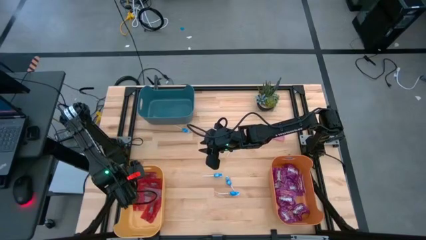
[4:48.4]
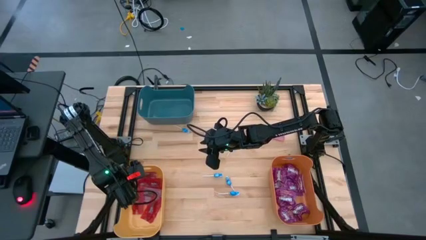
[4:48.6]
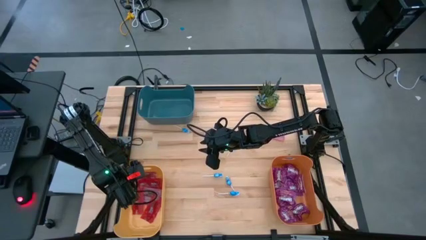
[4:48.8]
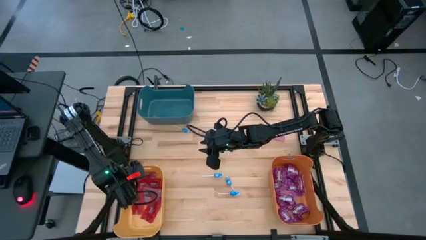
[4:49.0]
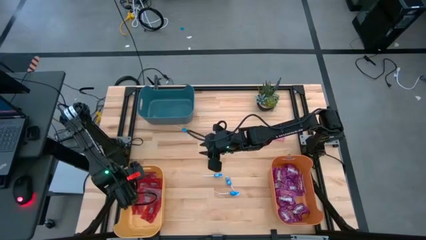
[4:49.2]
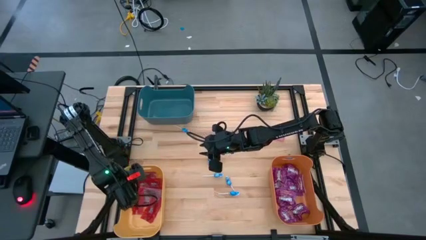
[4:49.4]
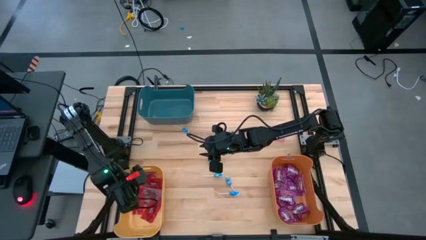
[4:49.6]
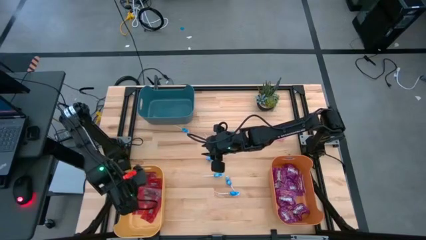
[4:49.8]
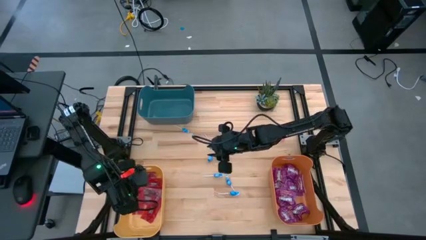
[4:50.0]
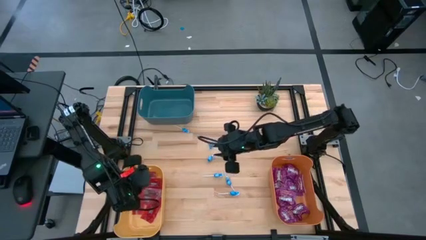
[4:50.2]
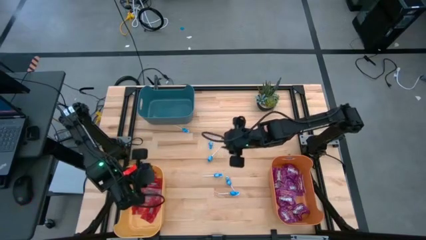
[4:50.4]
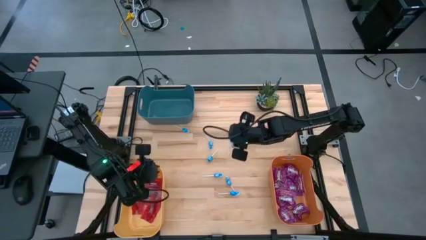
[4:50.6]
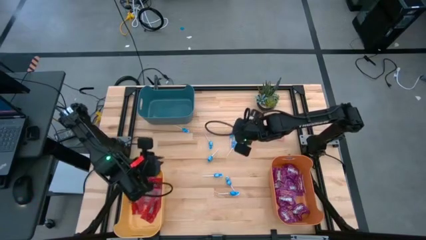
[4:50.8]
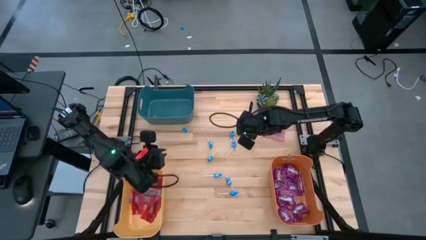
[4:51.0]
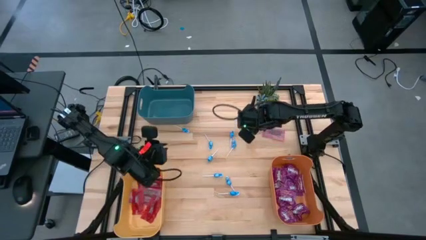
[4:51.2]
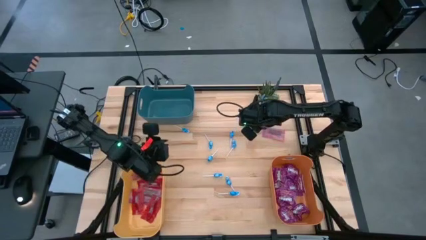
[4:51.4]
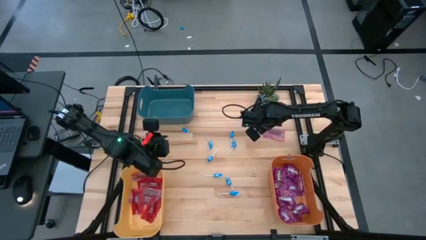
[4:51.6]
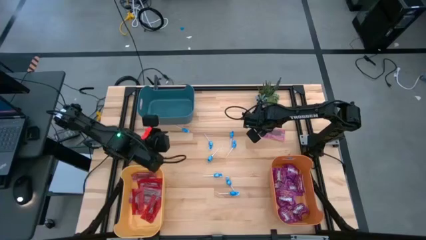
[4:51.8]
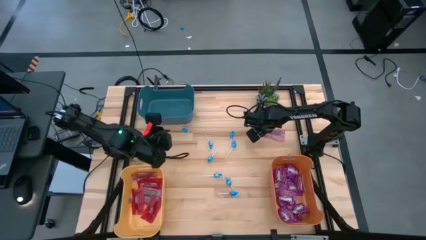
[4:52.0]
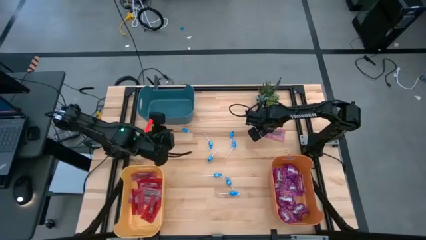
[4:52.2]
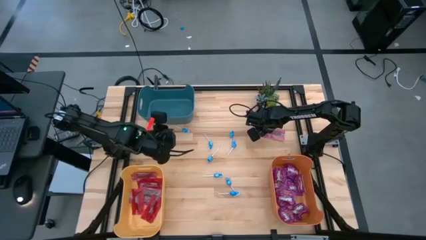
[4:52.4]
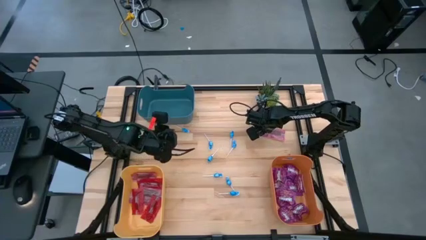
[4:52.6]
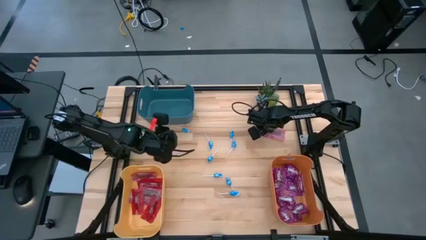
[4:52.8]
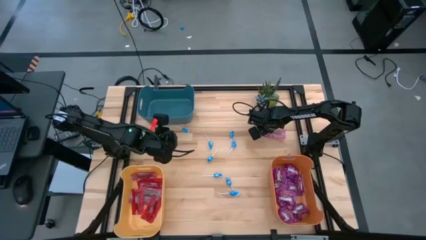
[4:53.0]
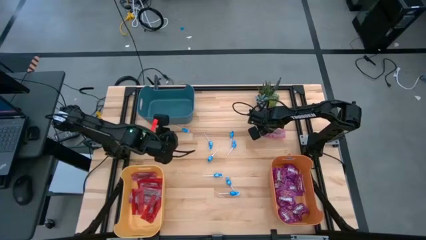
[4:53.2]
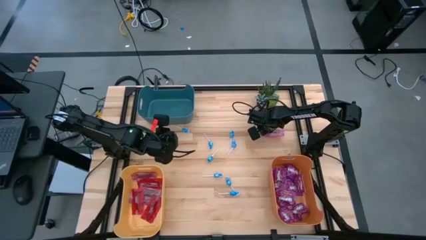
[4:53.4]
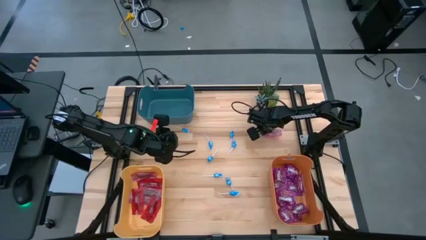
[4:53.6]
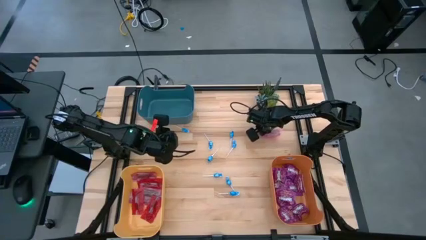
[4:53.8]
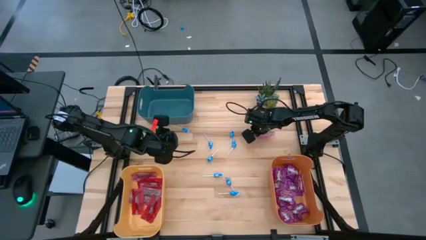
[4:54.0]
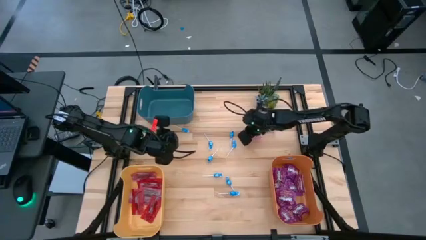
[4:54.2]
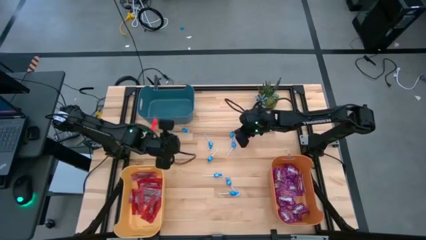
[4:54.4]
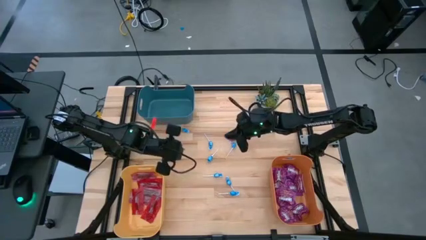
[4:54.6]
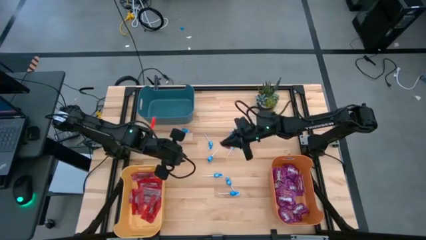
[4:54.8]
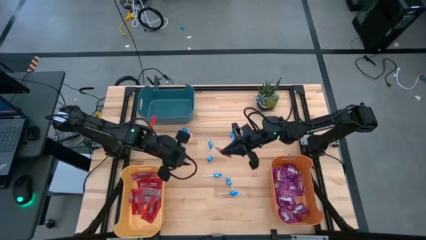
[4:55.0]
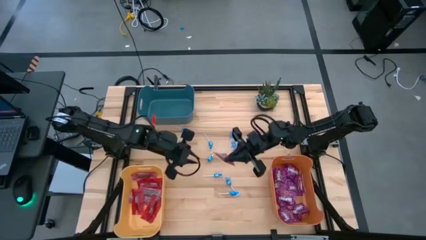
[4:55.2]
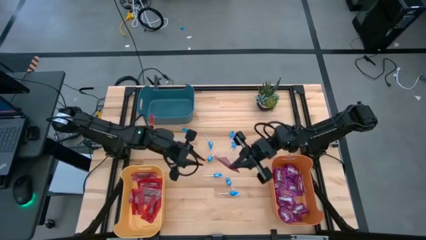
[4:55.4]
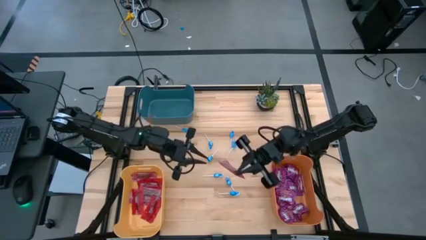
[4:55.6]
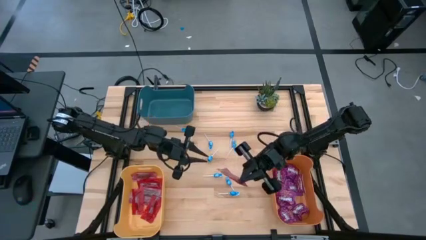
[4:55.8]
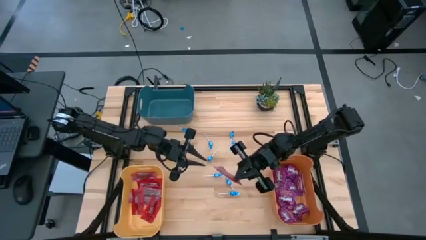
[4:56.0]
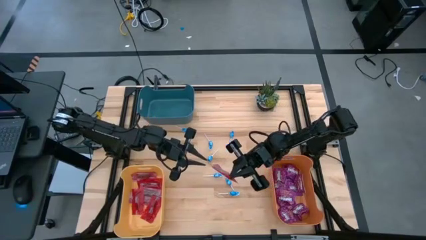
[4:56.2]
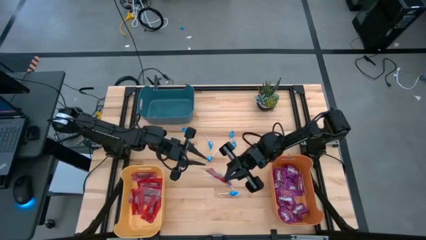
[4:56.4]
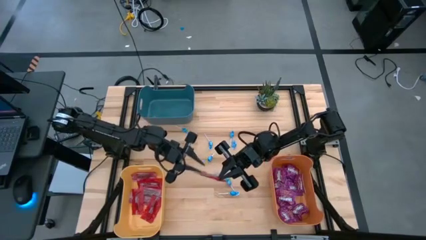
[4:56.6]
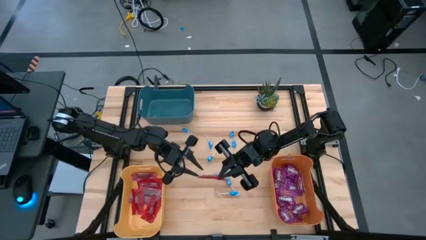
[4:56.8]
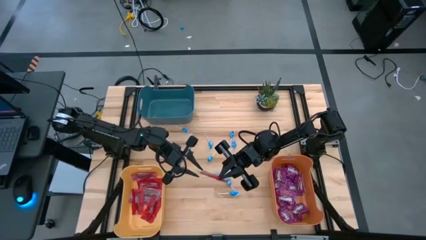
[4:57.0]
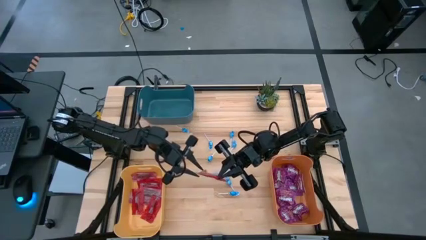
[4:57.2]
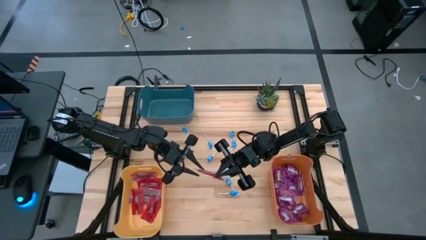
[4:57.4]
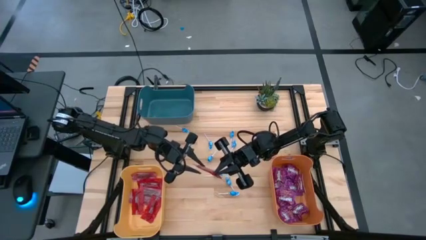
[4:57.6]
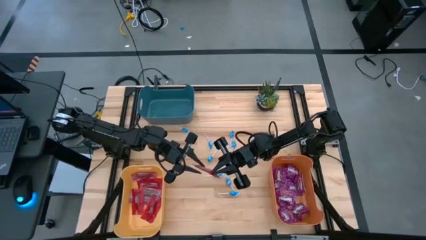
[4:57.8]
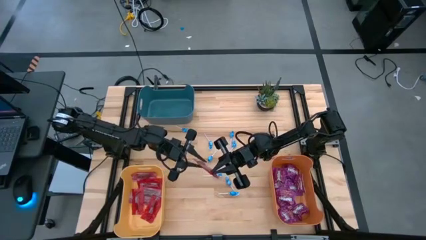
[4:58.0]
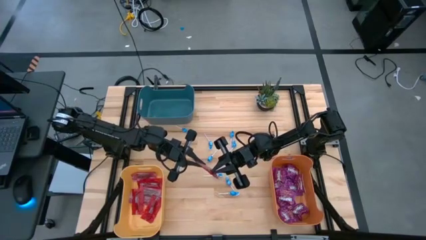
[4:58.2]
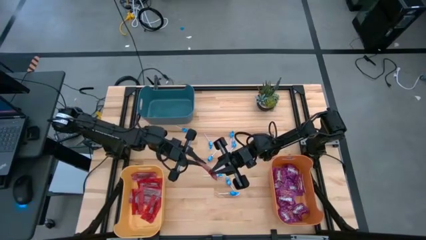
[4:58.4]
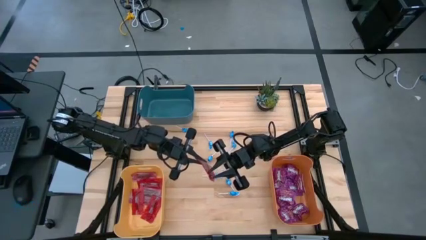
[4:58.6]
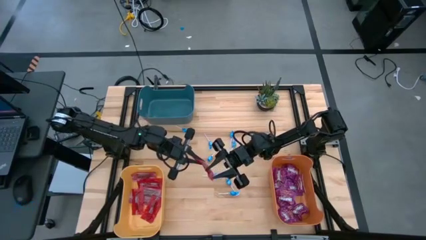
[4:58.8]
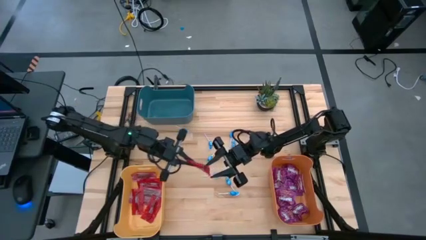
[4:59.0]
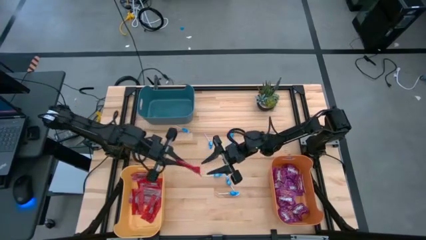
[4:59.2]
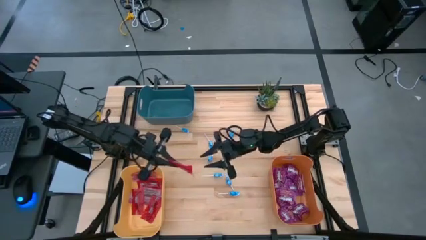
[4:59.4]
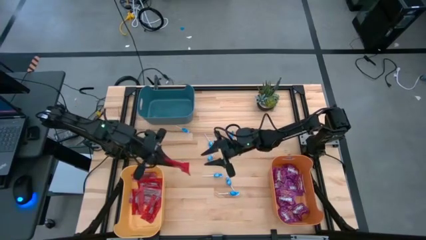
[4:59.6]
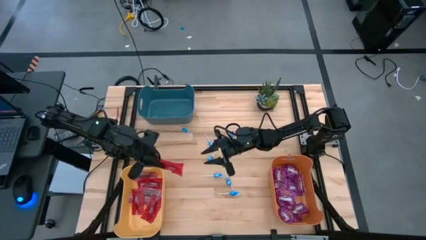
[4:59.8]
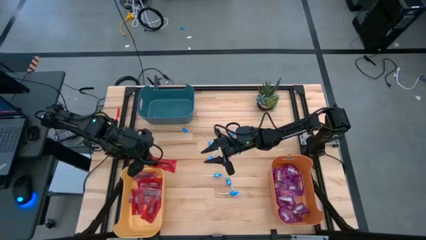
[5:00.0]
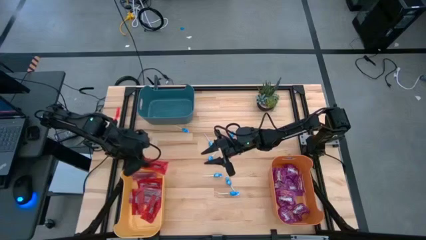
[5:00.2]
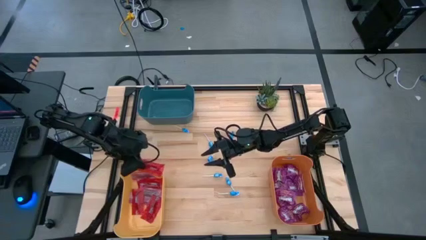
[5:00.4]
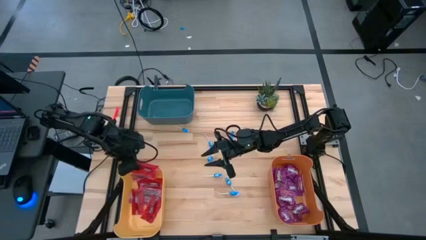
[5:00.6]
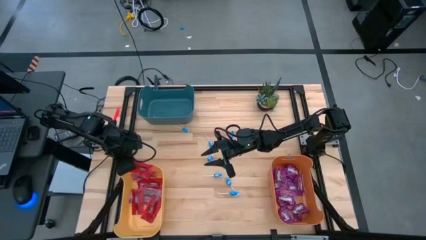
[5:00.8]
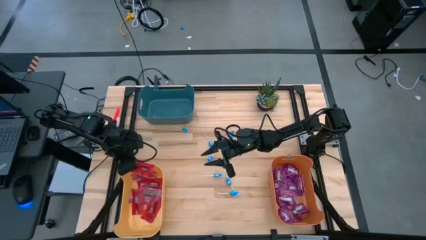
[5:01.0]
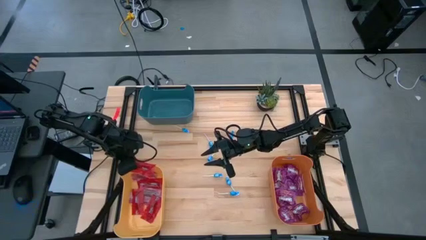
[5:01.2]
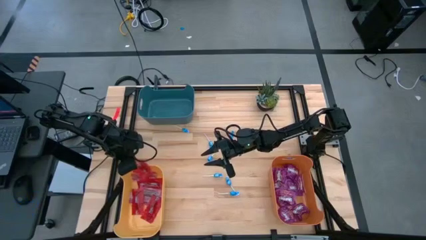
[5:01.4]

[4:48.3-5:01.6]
Task: Sort candy
Put the red candy into the yellow bin

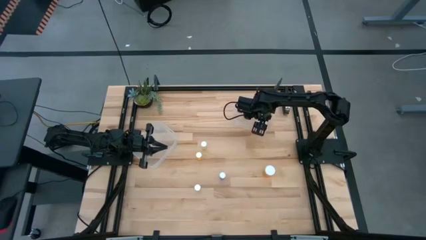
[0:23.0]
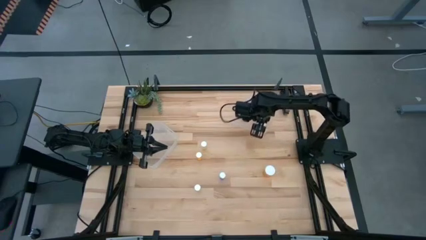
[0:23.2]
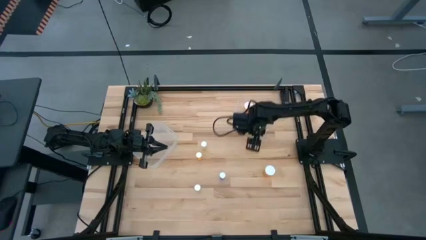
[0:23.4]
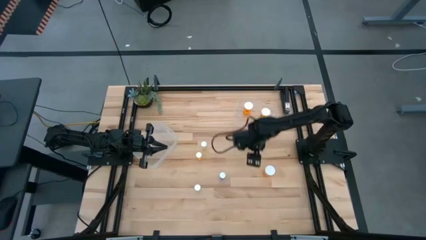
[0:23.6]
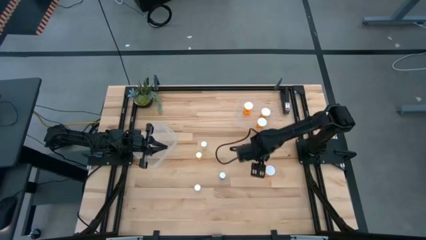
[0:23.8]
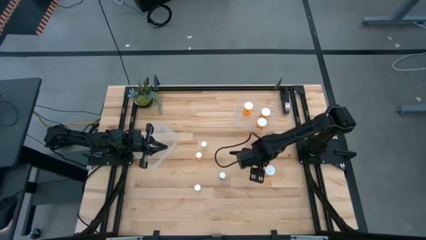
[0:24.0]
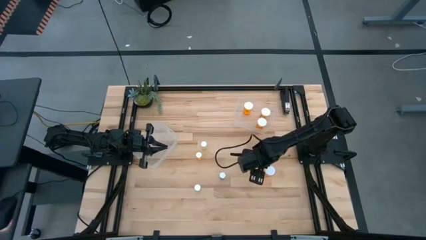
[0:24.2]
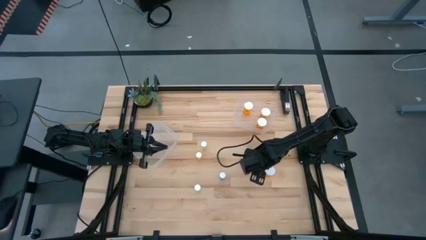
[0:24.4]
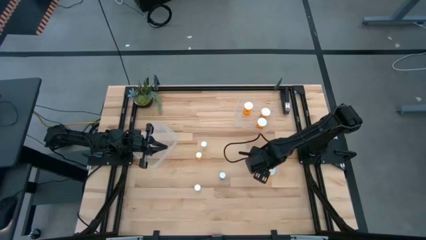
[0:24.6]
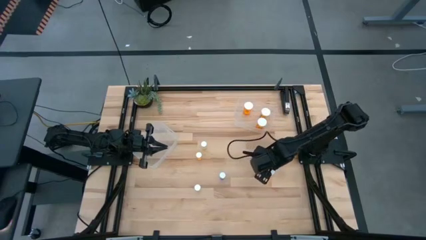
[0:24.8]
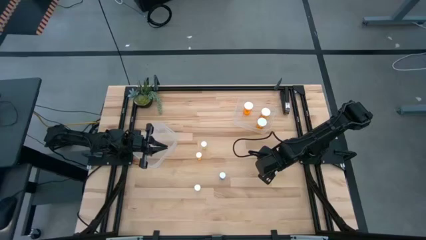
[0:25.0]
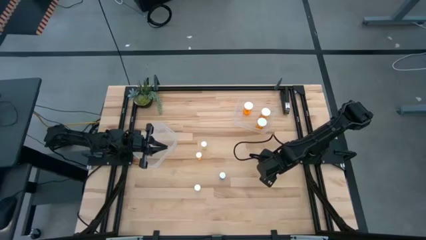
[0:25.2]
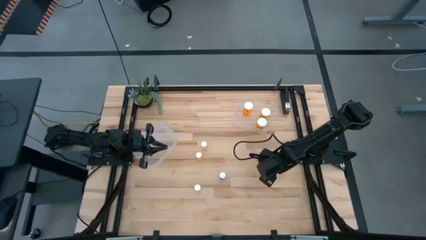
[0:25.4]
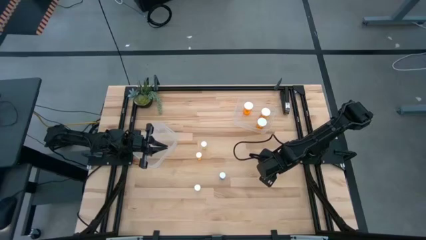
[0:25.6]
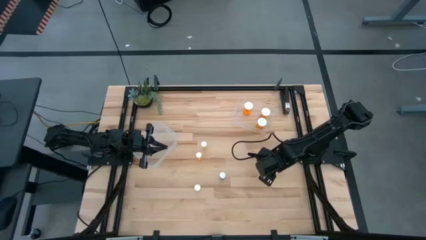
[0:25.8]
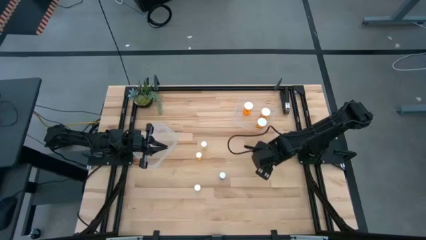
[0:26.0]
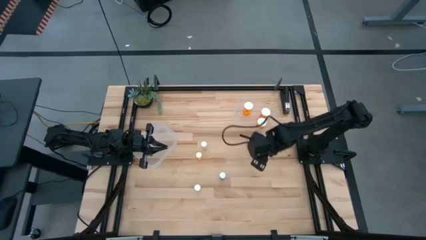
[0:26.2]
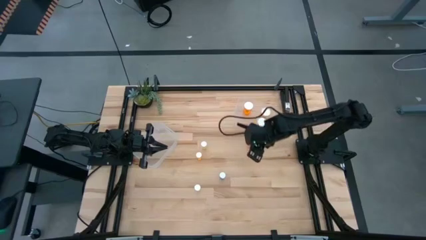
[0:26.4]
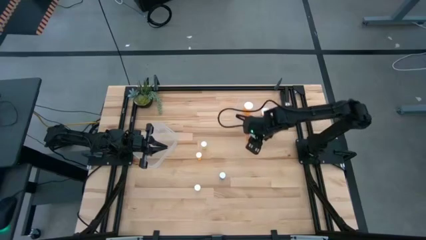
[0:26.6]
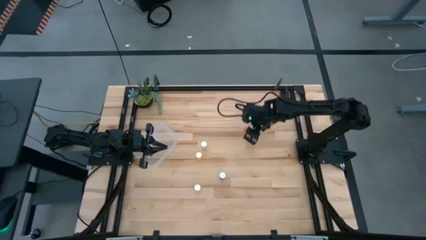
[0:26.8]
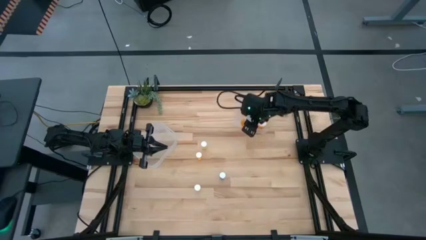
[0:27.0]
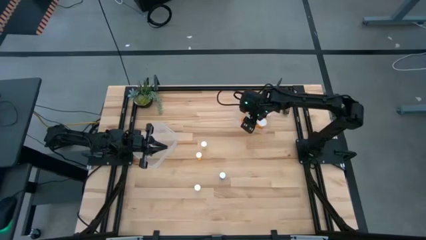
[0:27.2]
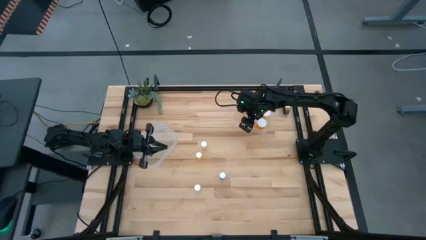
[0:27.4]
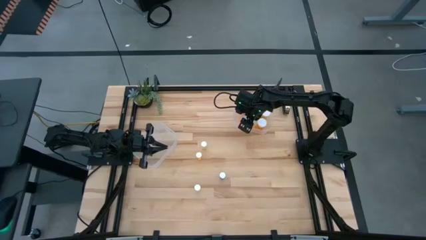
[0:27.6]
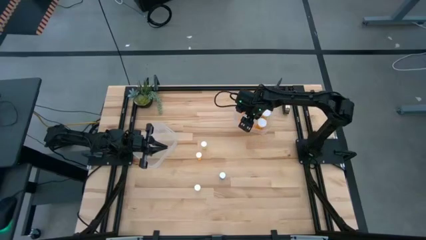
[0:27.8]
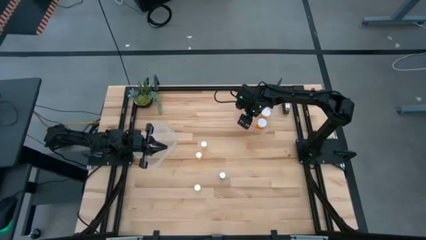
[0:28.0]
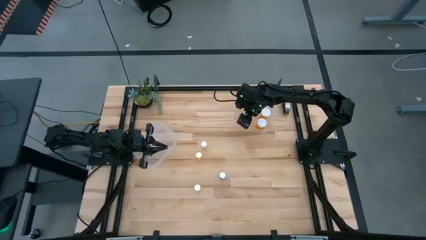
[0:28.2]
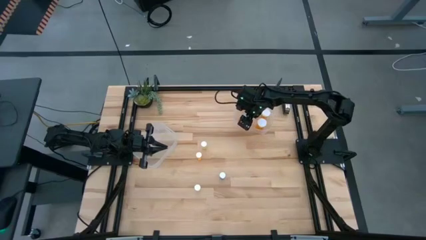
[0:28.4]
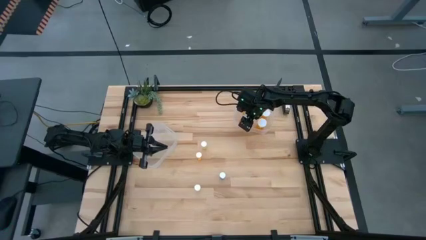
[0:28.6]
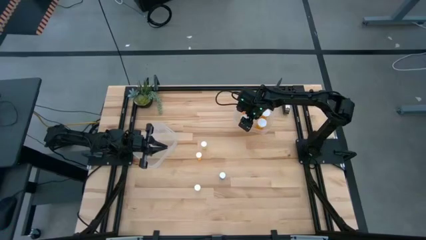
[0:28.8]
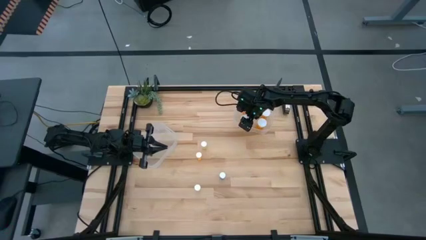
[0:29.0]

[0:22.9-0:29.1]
Task: Pick and place medicine bottles into bin by pill shape (circle, oval)
Put the big orange pill bottle into the right transparent bin
